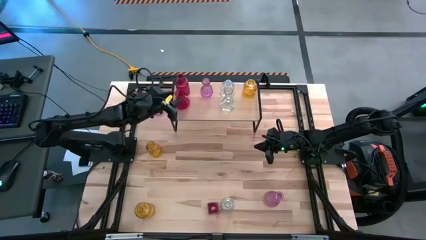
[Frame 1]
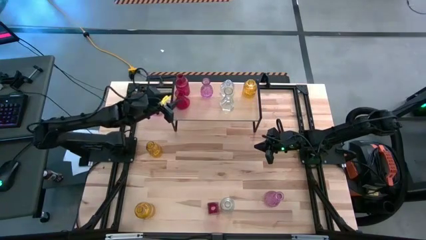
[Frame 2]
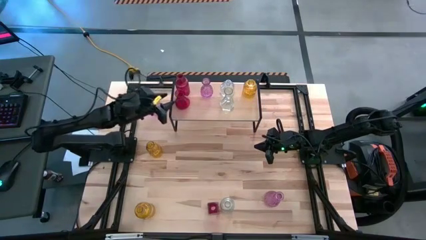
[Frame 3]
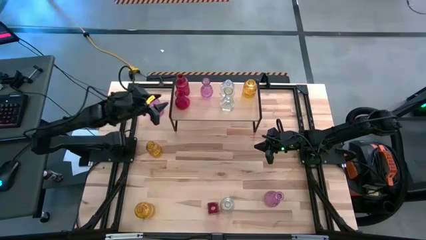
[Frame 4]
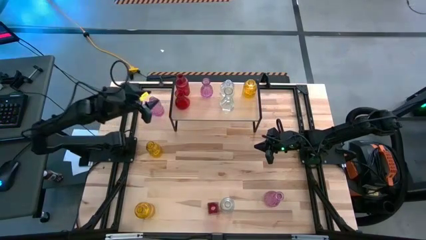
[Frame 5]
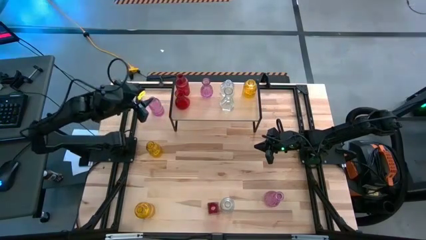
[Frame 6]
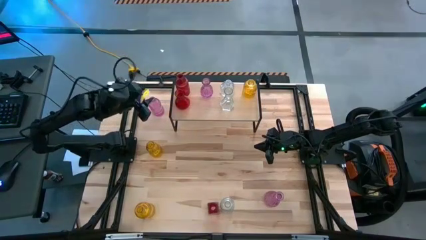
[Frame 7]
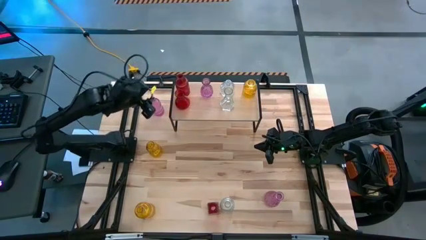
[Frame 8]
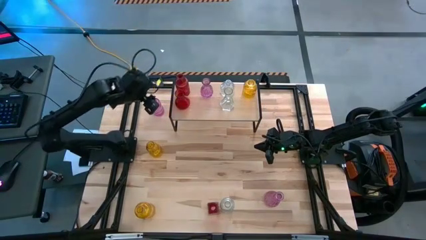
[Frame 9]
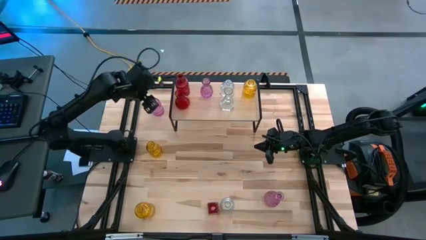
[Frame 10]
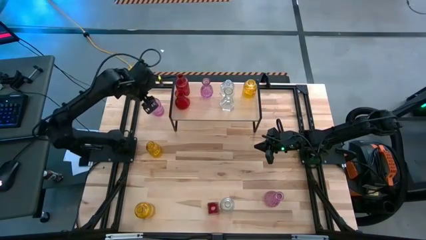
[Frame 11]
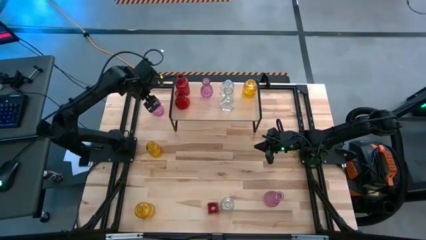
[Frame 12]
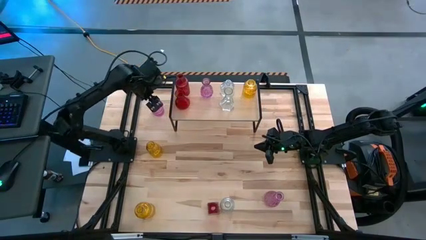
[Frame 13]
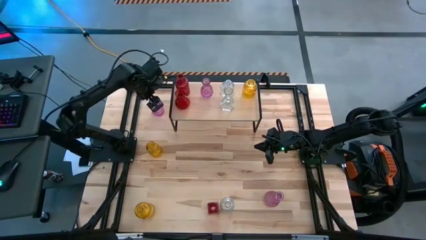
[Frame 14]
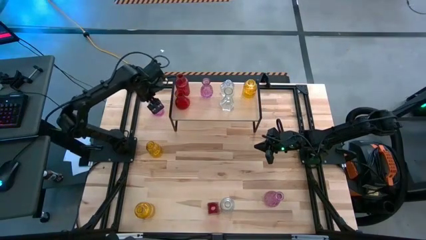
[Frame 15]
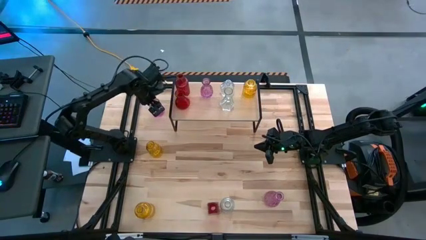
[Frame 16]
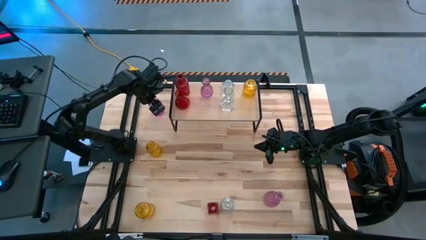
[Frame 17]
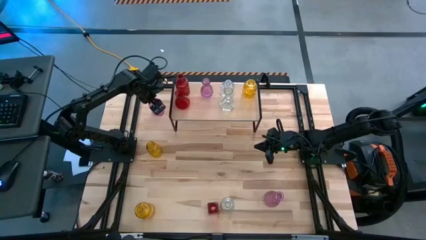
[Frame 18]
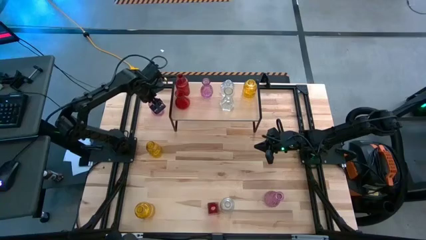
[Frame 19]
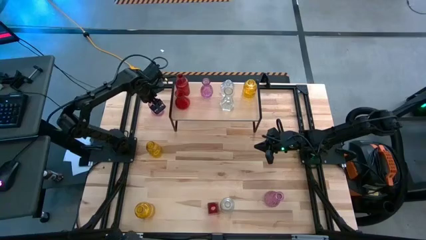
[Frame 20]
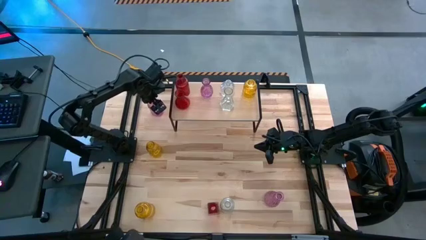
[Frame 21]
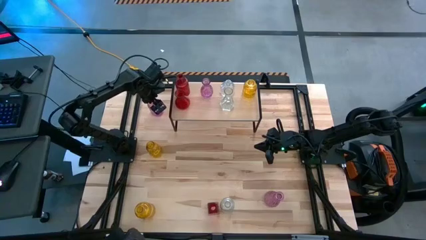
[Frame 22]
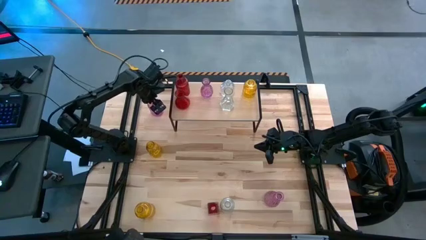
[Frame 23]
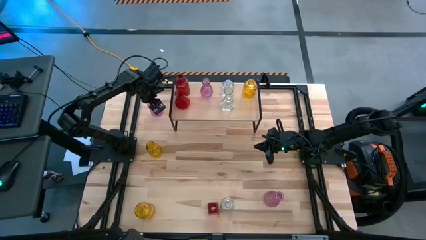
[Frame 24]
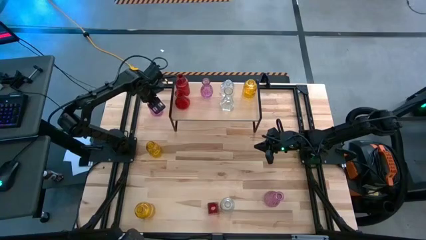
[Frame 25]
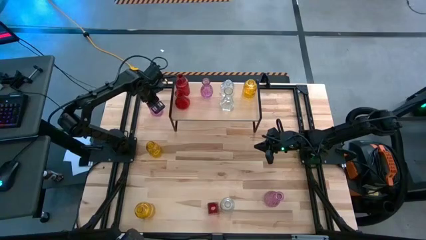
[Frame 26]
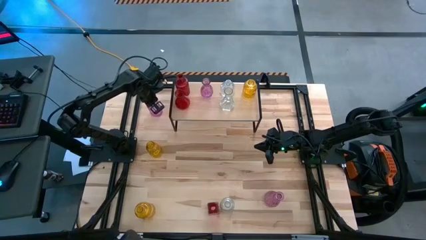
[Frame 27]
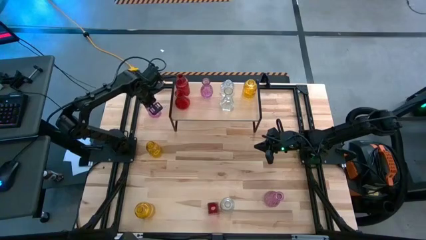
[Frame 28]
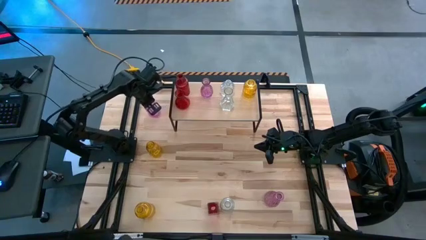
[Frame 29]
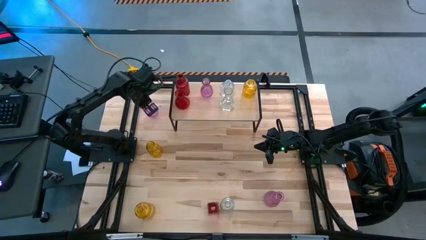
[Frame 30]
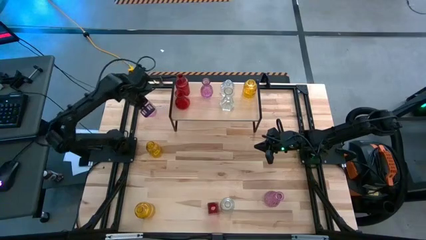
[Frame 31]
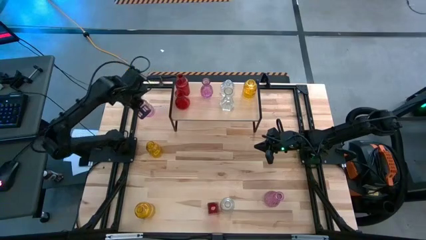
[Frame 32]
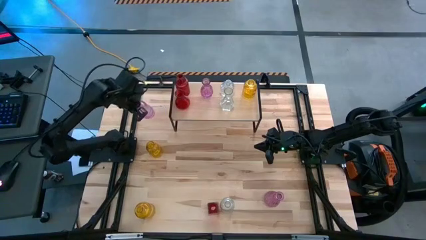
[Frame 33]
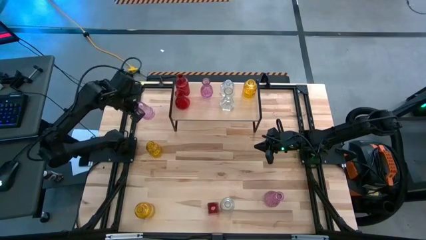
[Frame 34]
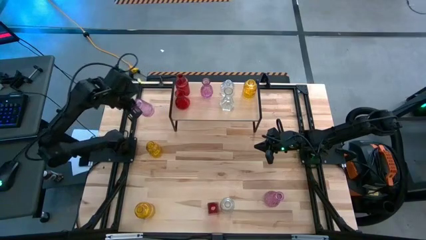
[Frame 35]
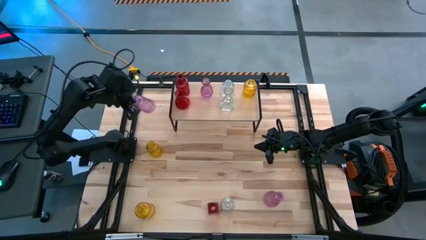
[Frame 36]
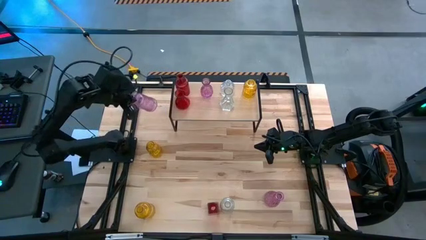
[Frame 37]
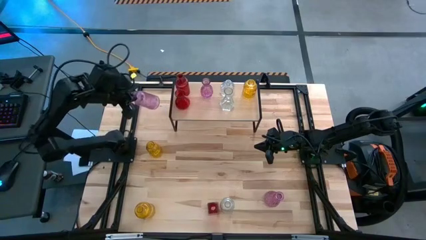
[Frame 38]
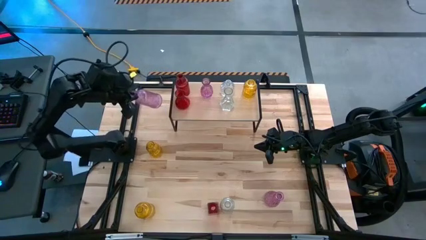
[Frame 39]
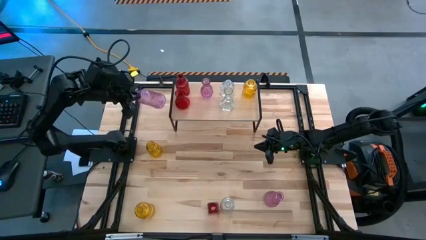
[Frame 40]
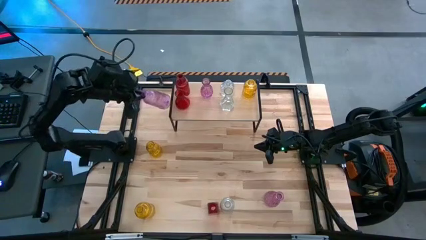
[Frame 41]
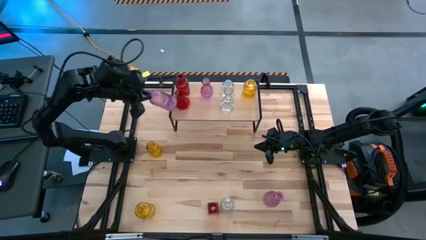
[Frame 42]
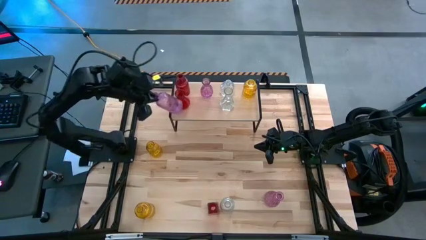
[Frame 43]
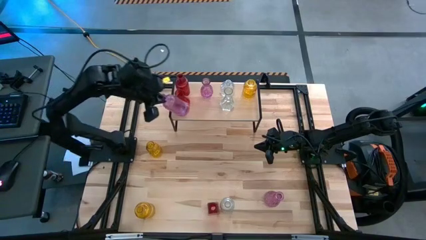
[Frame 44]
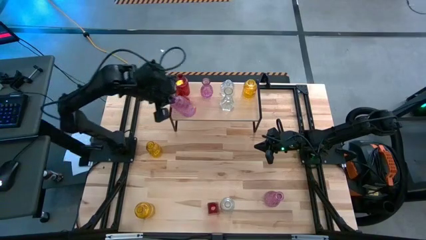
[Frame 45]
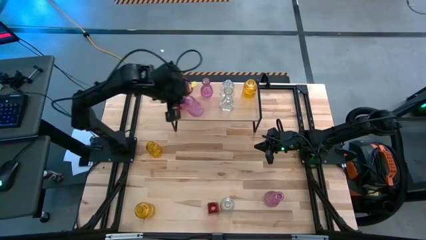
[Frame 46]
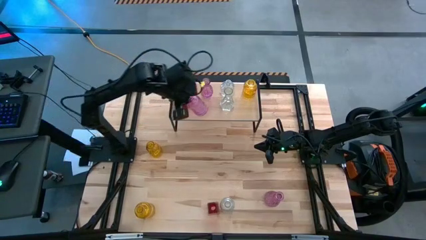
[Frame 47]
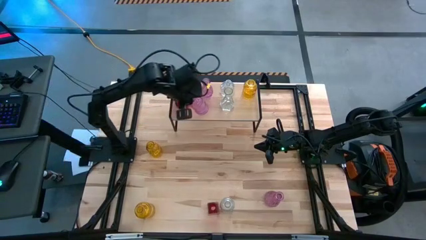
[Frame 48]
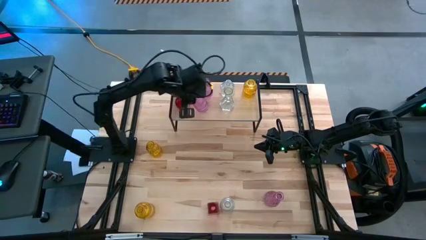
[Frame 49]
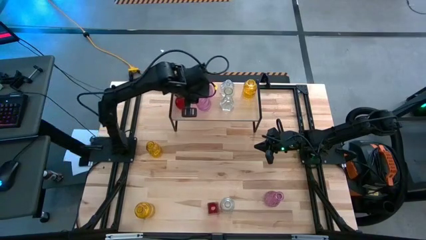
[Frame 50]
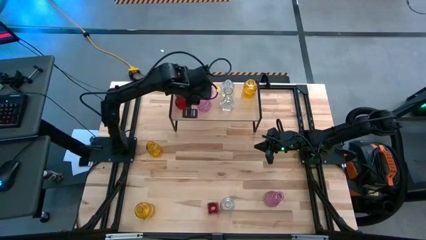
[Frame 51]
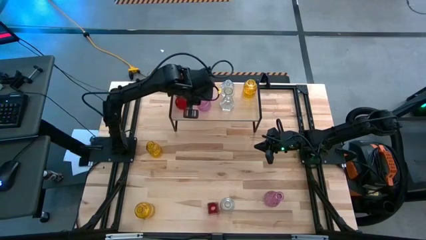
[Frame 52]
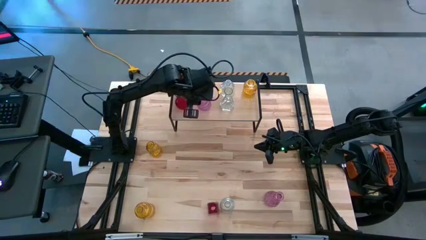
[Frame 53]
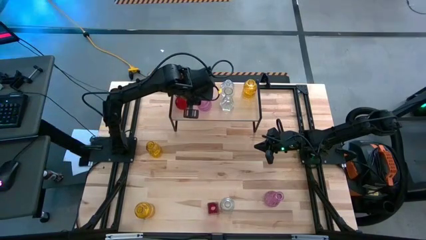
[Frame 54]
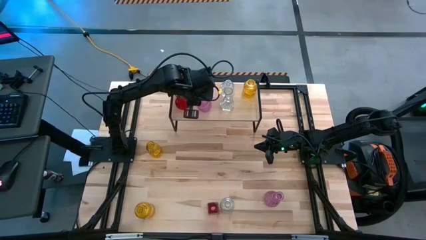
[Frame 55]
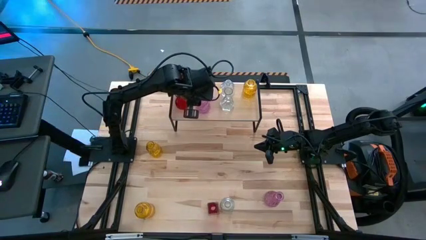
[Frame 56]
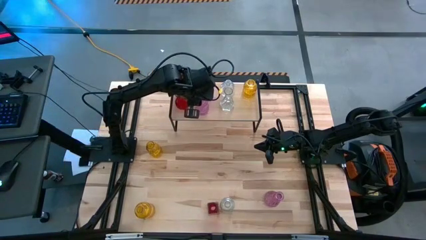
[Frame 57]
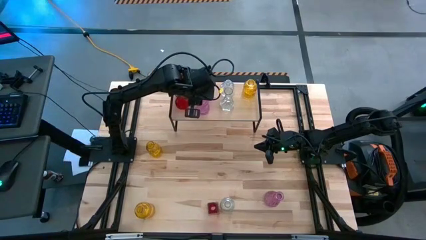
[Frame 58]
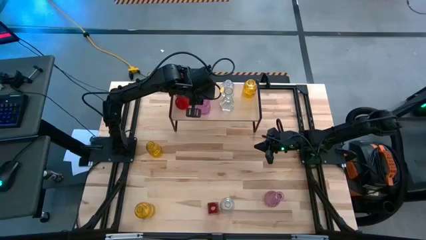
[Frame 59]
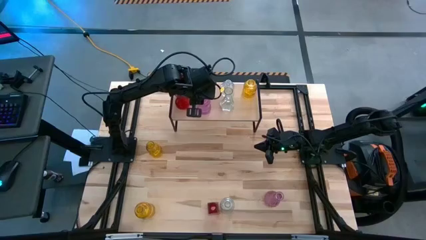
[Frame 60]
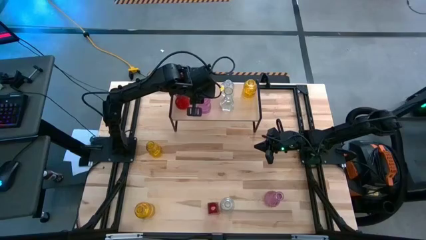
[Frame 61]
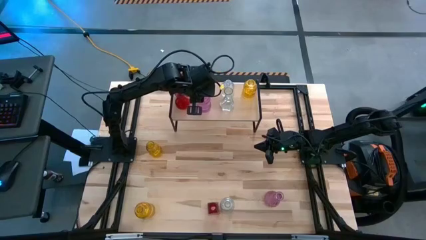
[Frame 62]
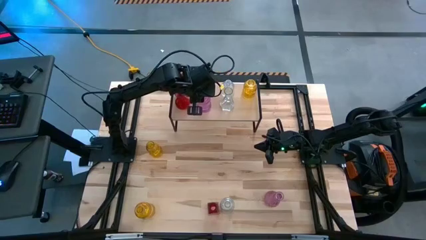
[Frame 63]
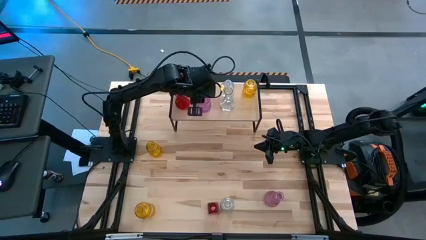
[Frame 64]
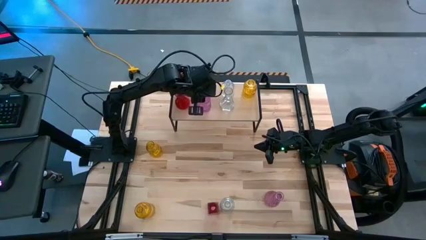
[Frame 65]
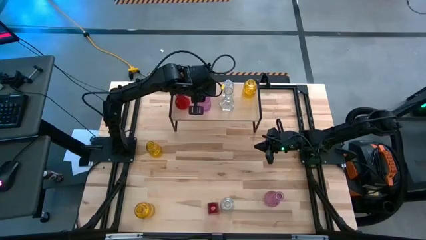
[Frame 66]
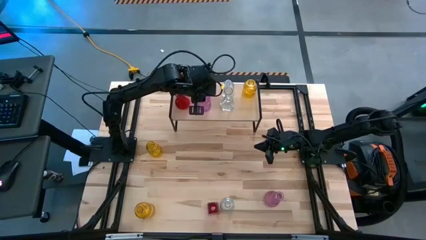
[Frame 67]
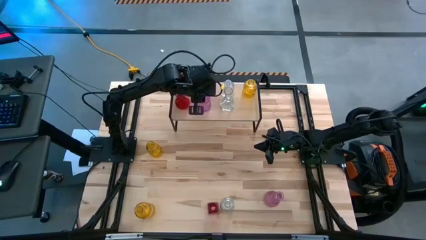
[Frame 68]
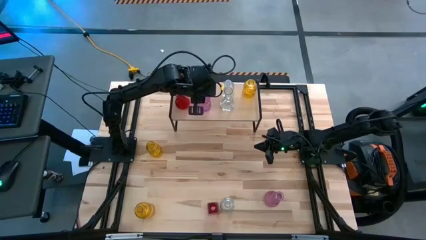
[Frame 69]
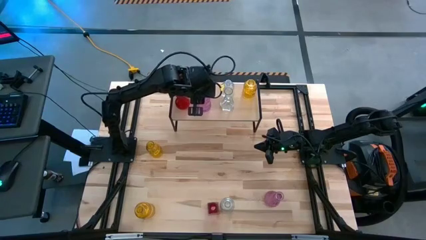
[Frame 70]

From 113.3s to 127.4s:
Task: sort vases onto shelf
Put the left pink vase on the shelf aligned with the other pink vase
